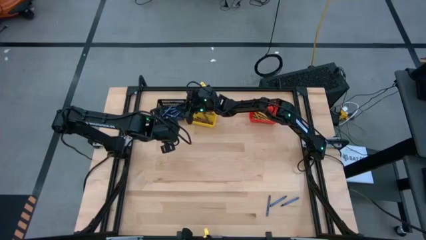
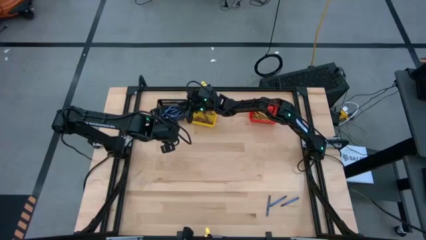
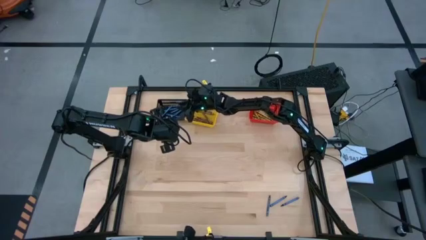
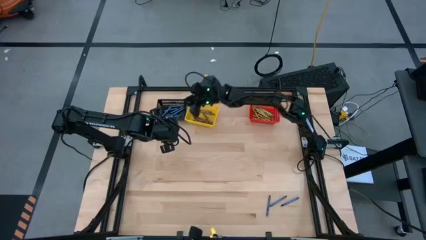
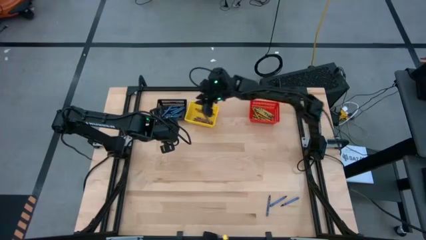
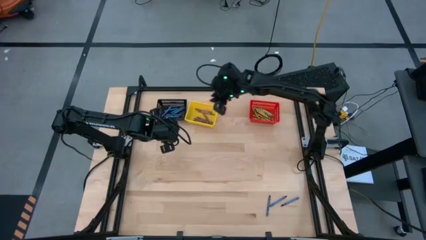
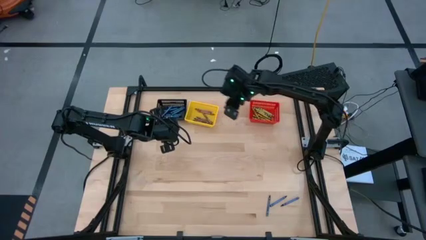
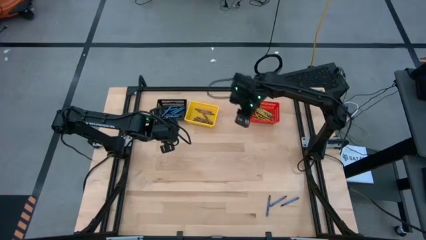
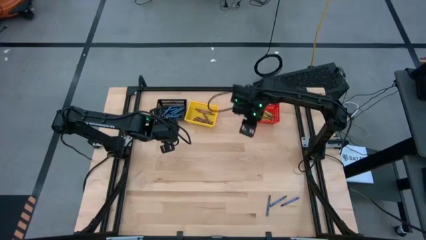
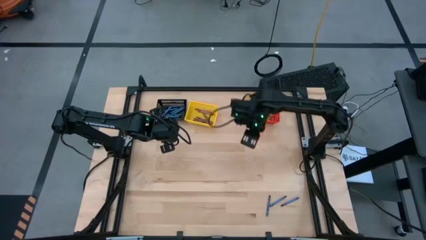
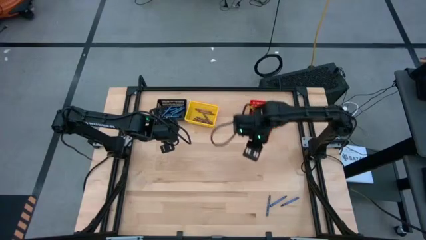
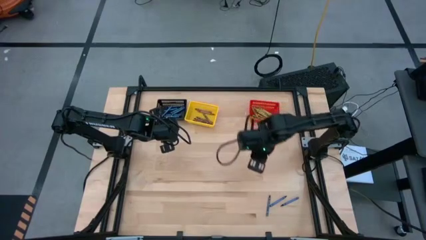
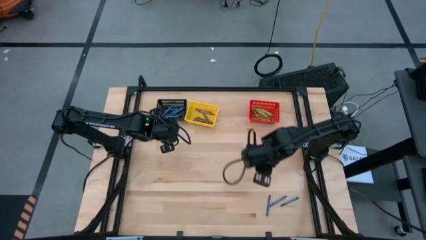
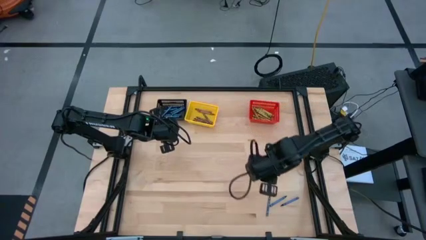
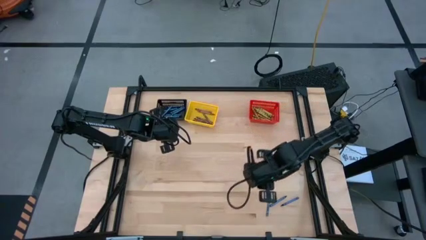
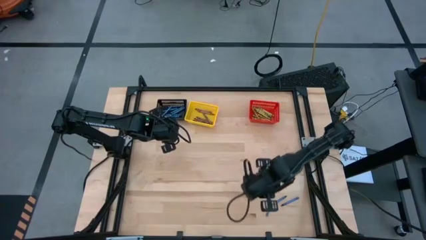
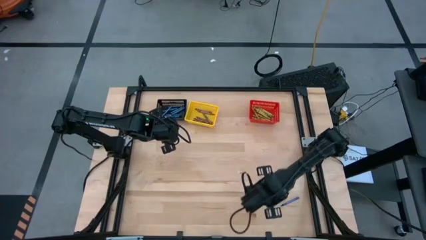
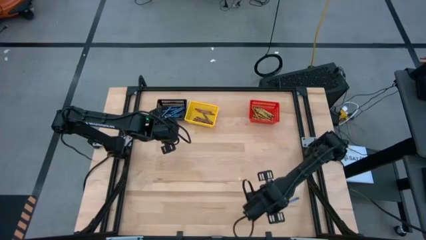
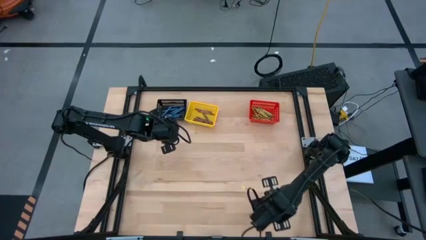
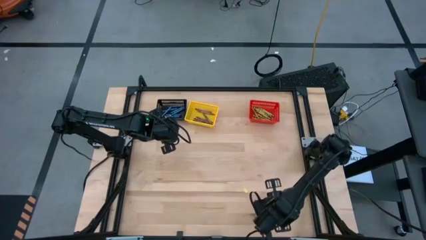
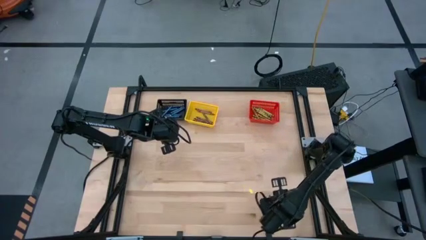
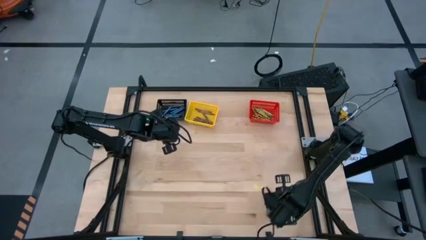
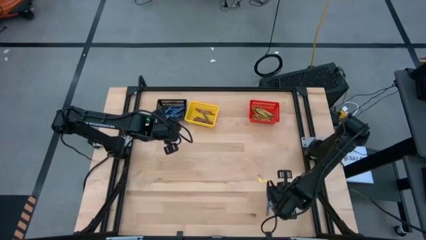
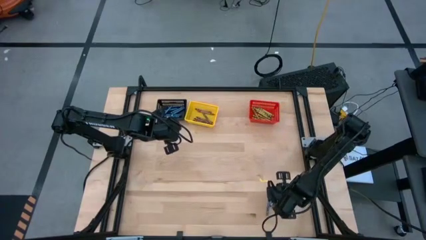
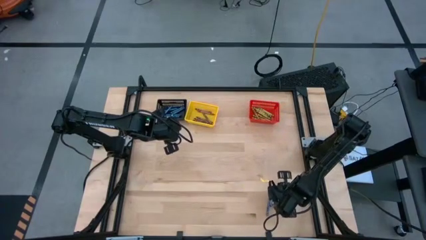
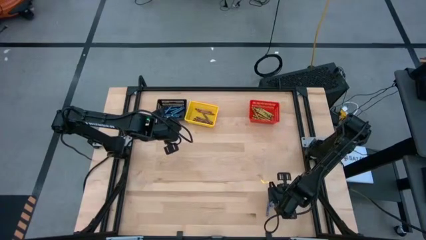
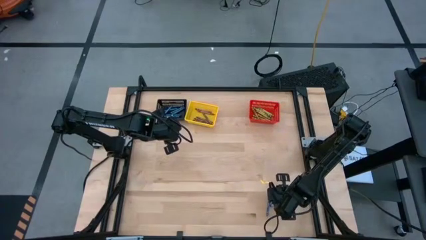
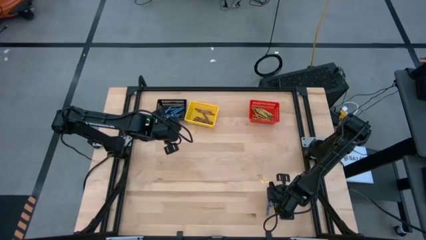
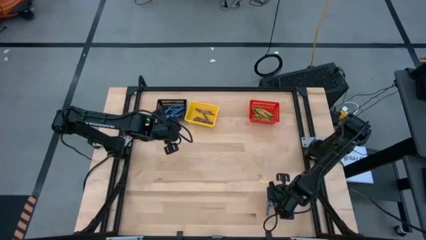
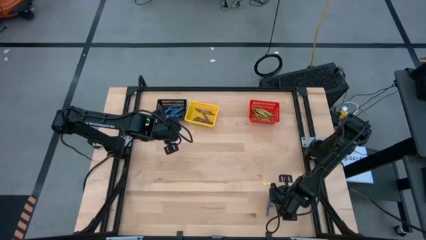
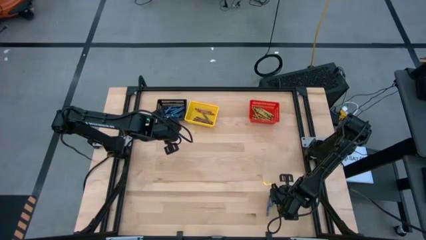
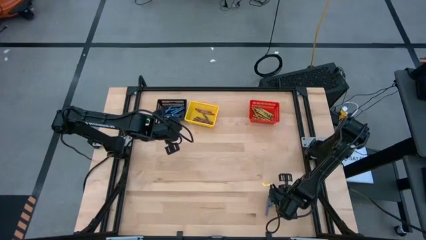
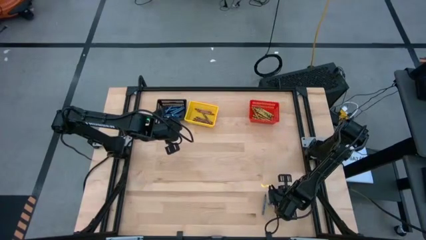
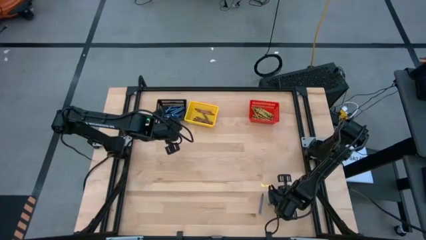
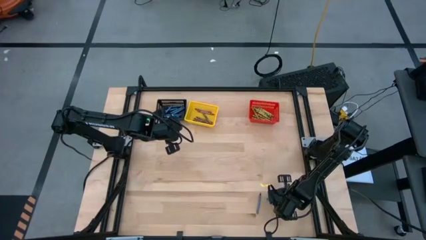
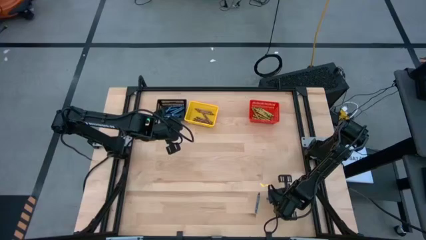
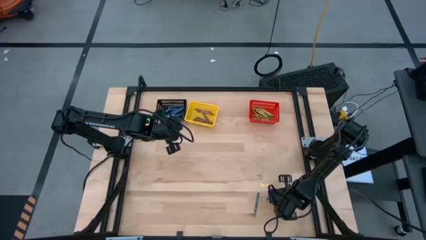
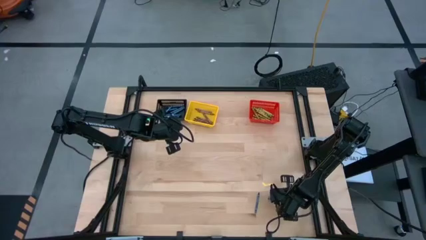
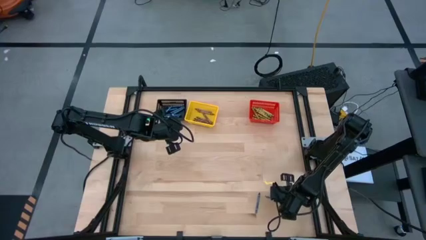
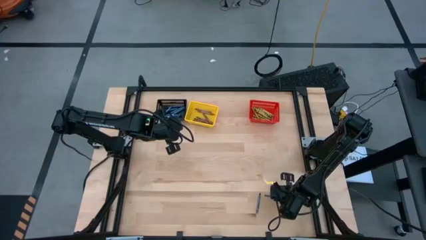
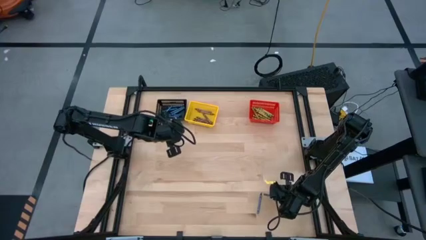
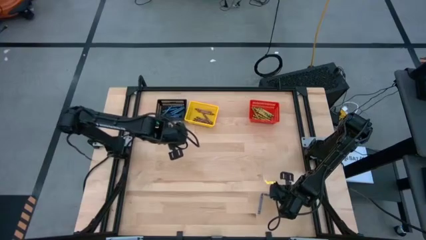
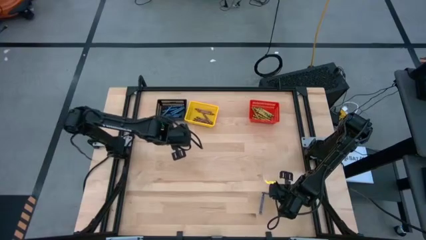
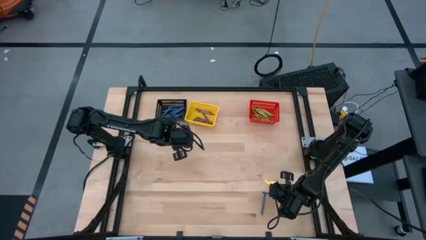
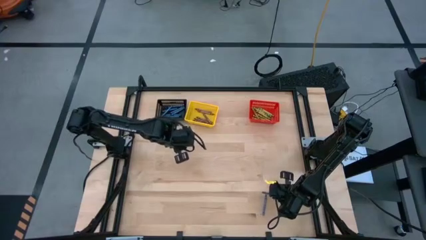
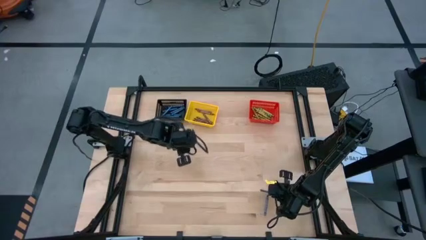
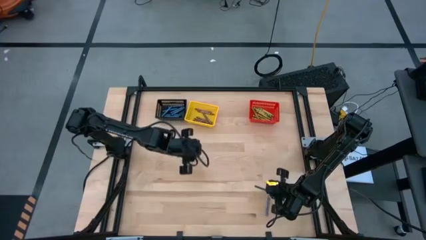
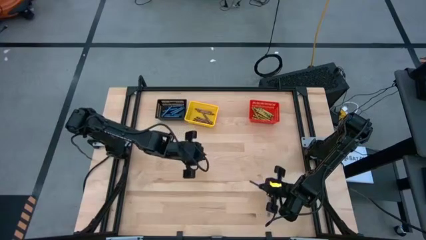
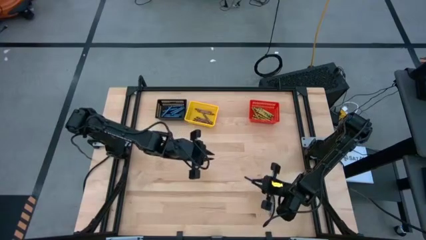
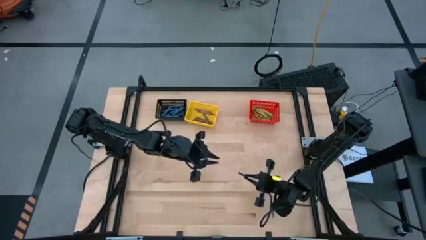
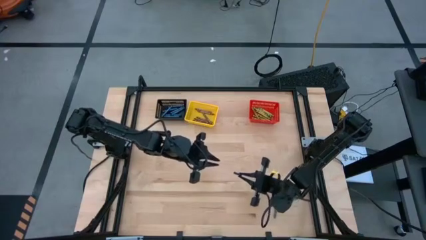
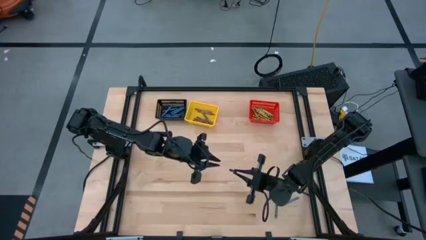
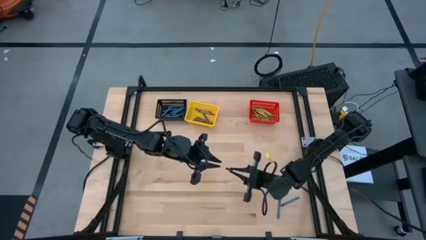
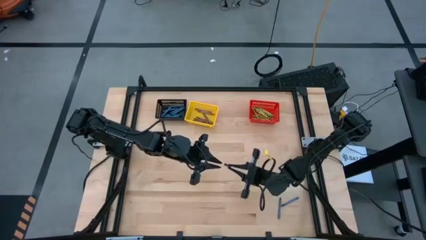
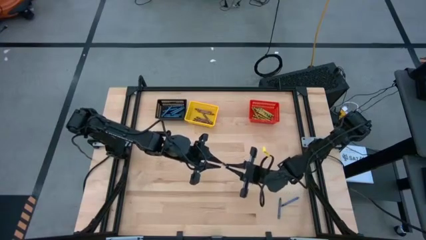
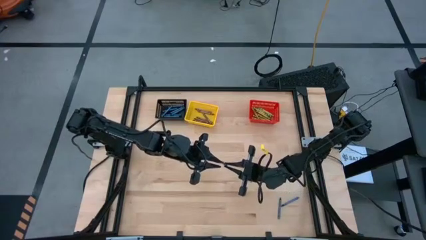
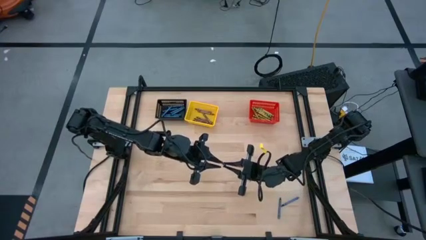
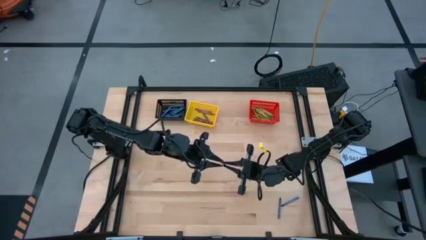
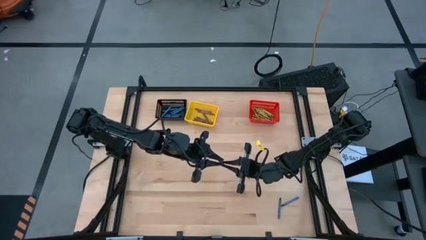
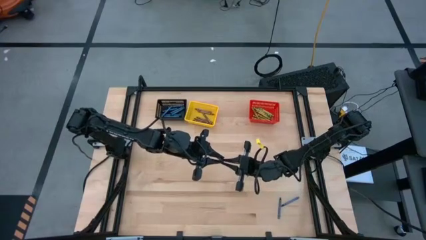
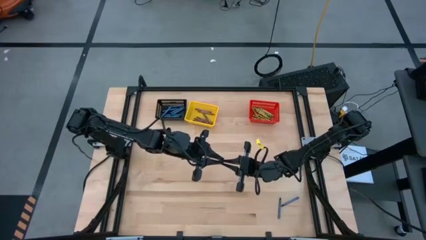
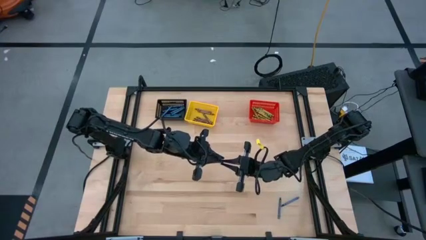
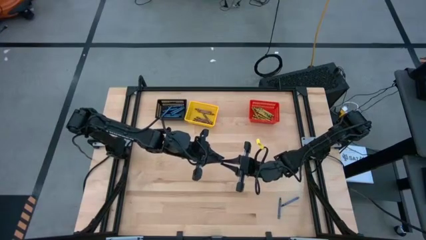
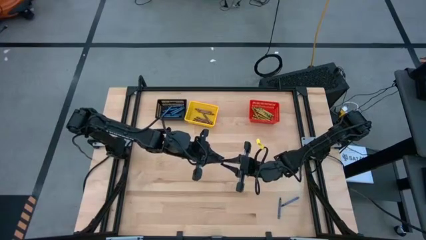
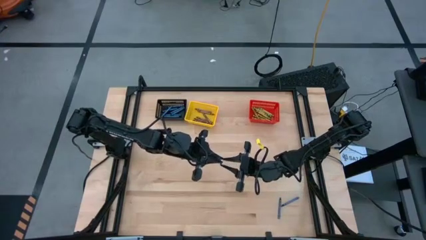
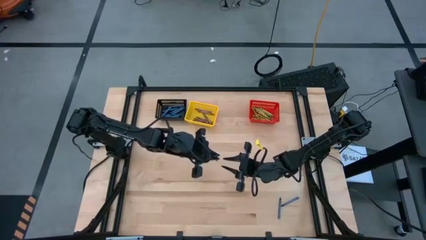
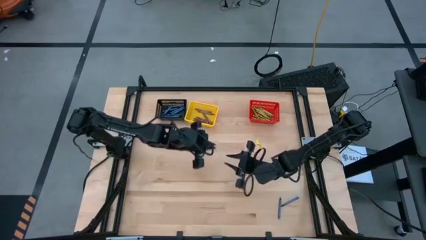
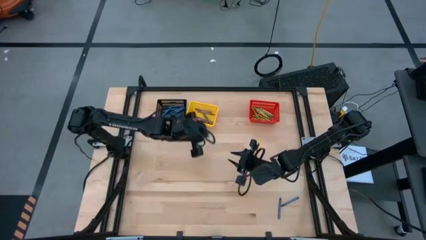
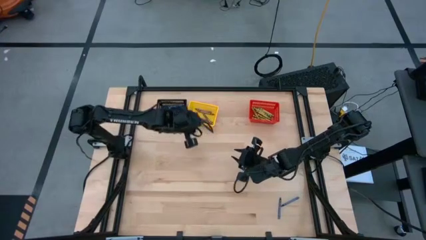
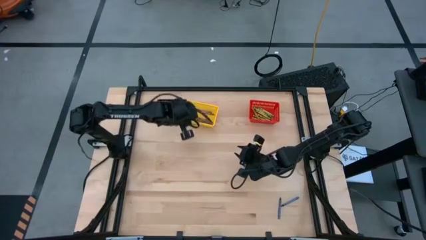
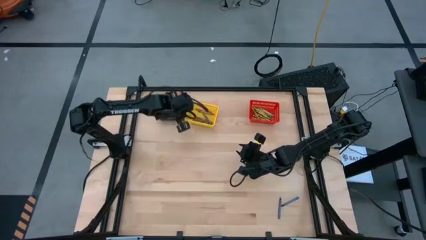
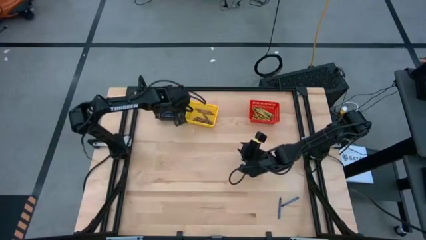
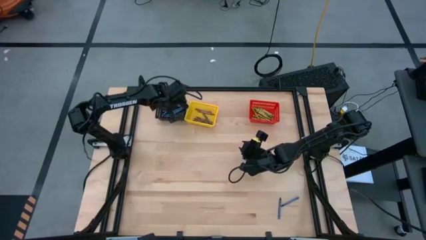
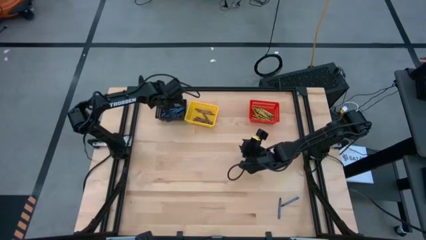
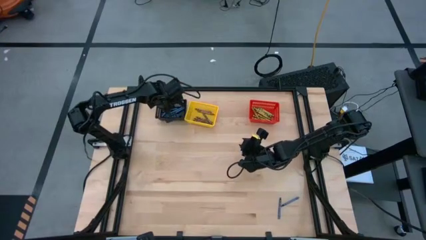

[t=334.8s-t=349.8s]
Task: Sort crayons
Put the middle blue crayon into the black bin

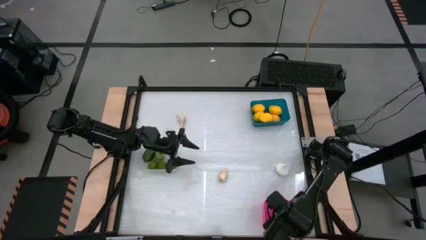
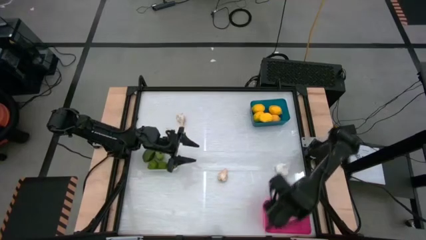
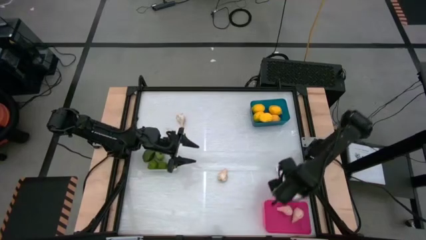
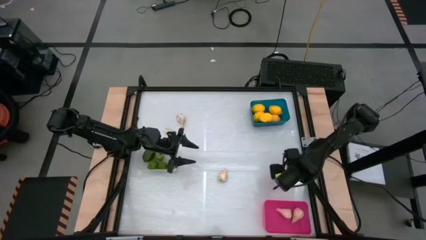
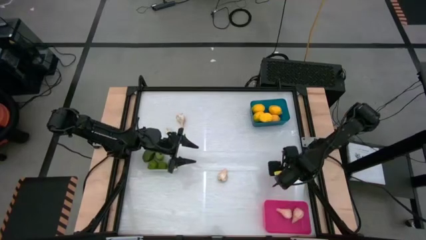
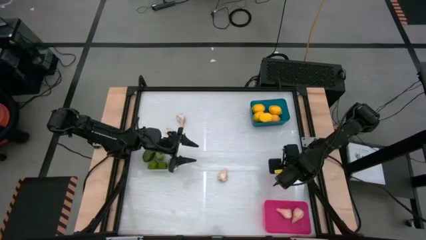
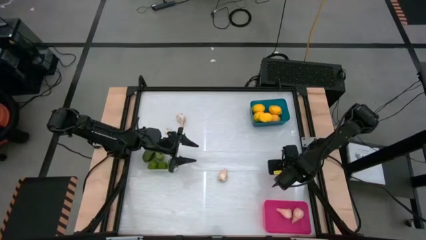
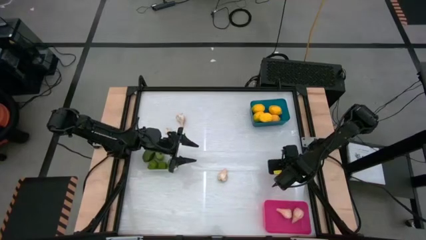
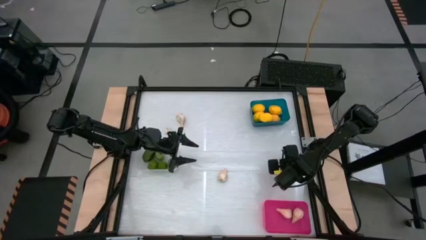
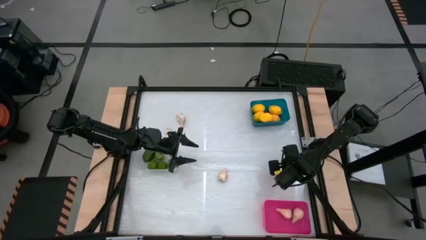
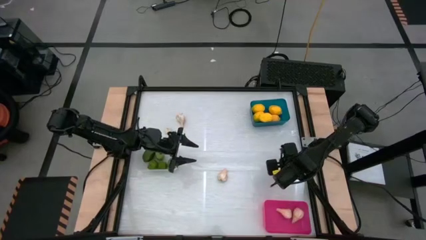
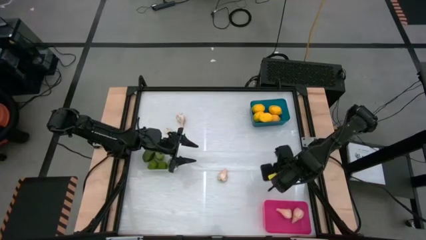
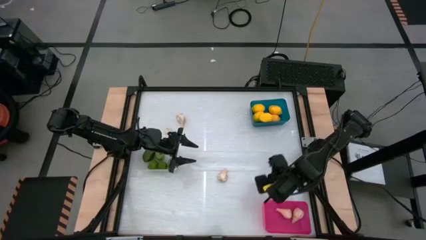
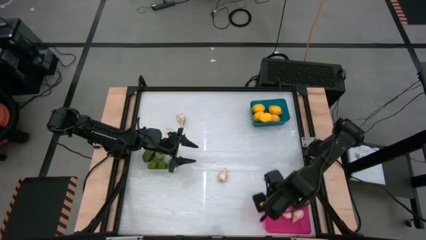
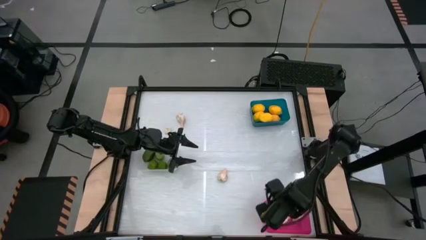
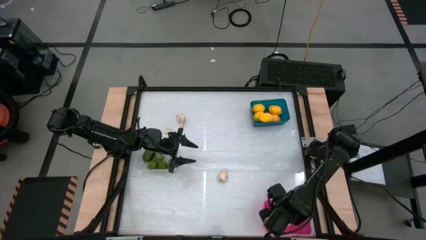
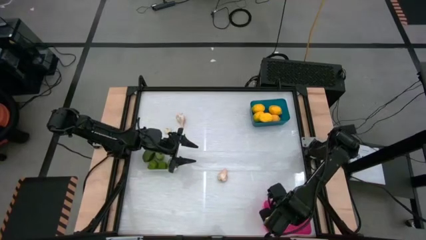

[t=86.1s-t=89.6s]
Task: Sort produce into baskets
Put the white garlic into the pink bin
